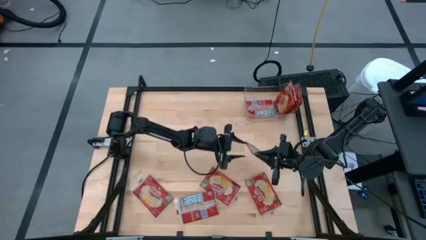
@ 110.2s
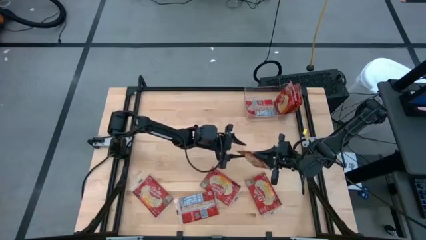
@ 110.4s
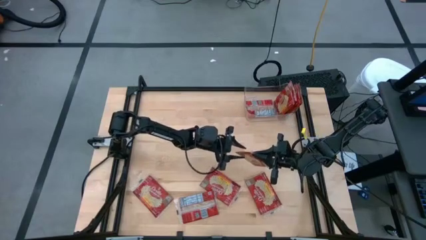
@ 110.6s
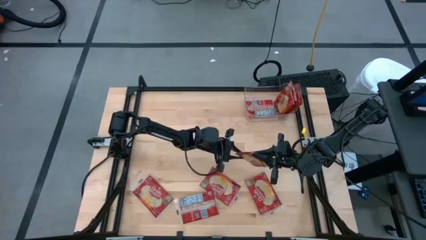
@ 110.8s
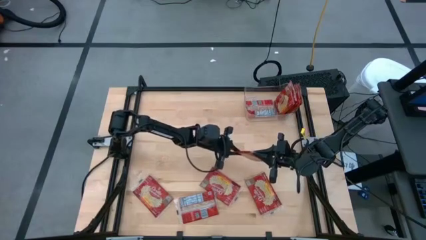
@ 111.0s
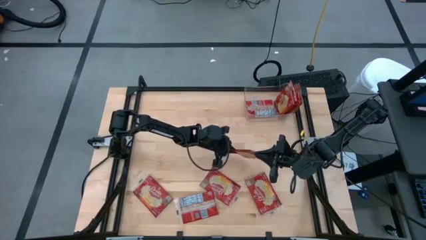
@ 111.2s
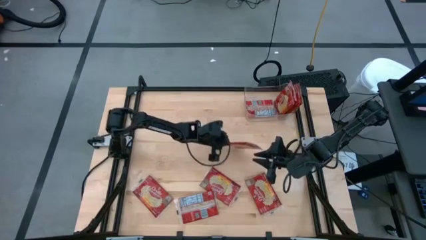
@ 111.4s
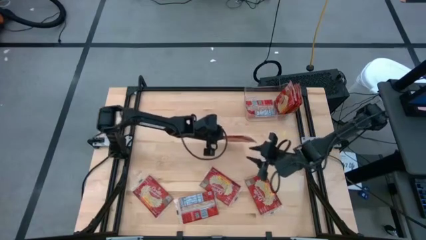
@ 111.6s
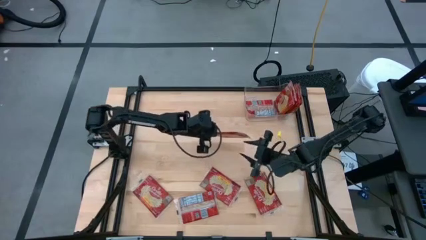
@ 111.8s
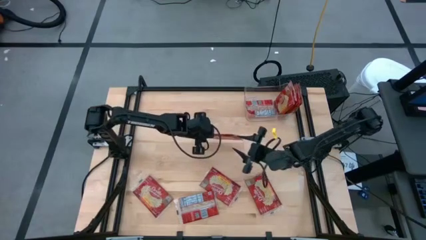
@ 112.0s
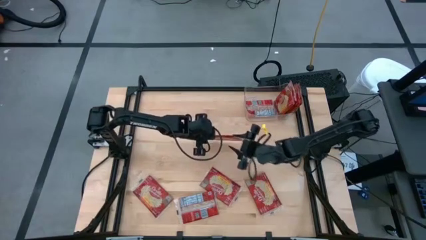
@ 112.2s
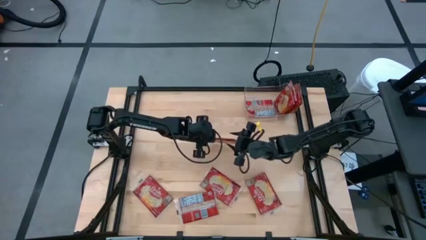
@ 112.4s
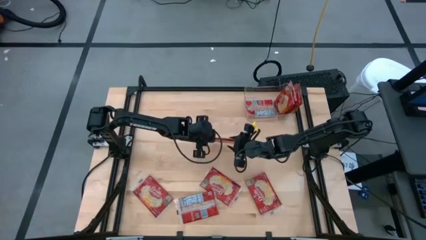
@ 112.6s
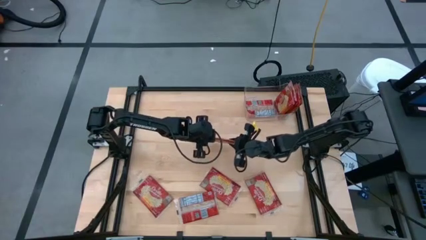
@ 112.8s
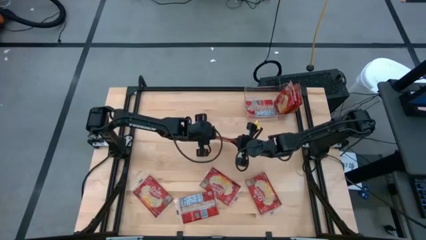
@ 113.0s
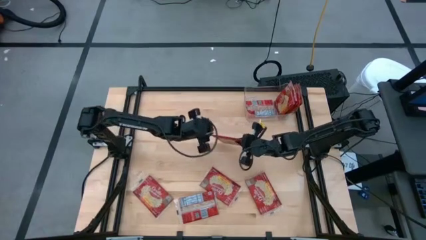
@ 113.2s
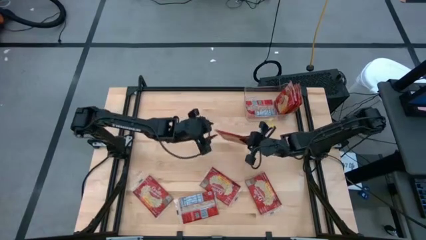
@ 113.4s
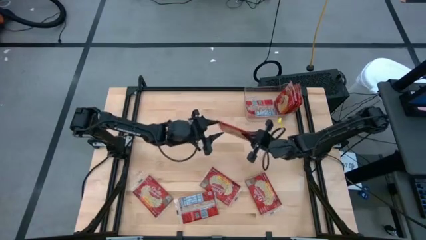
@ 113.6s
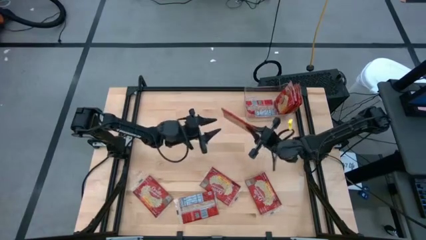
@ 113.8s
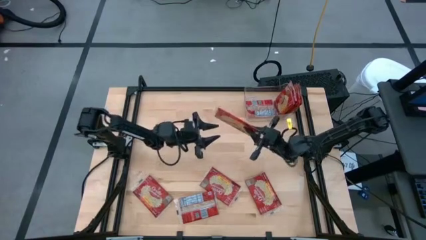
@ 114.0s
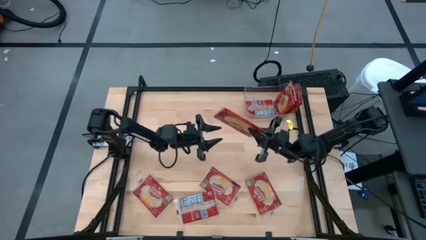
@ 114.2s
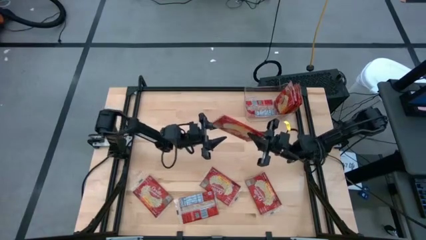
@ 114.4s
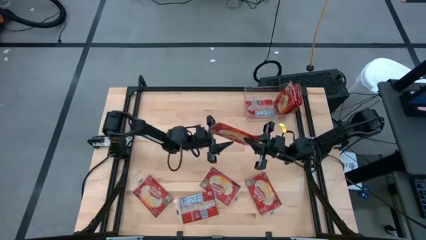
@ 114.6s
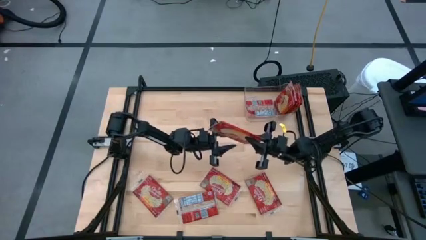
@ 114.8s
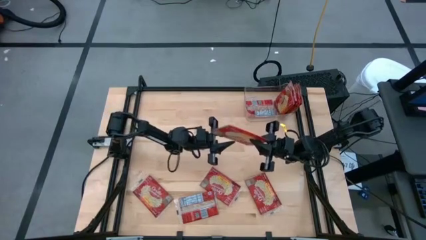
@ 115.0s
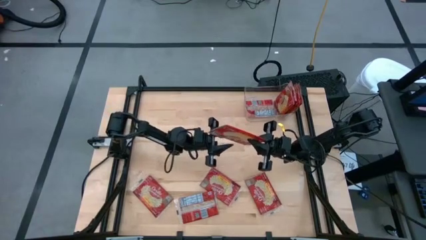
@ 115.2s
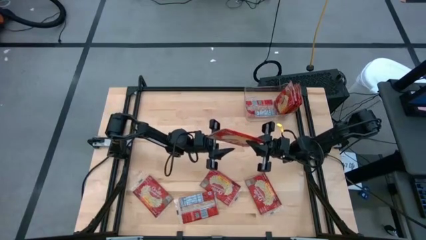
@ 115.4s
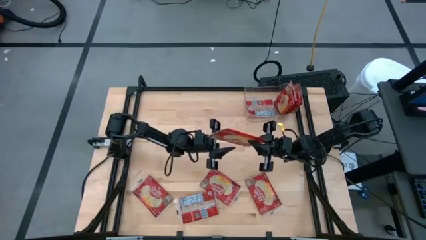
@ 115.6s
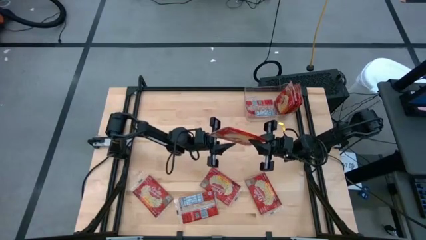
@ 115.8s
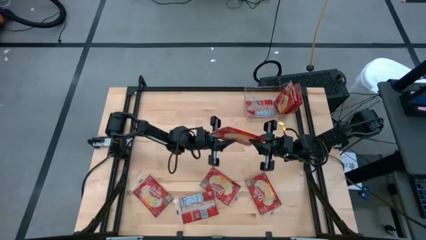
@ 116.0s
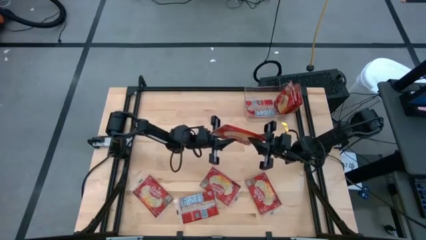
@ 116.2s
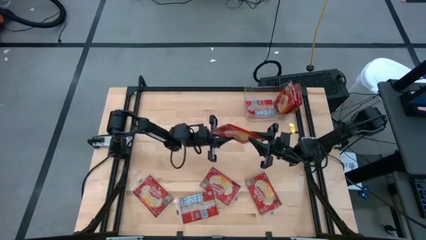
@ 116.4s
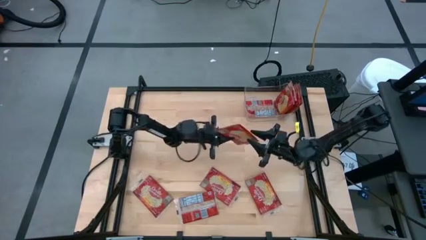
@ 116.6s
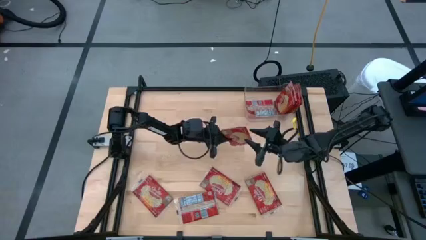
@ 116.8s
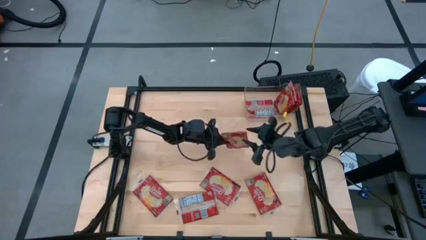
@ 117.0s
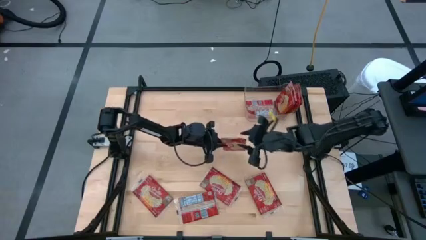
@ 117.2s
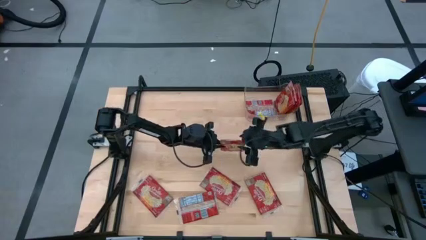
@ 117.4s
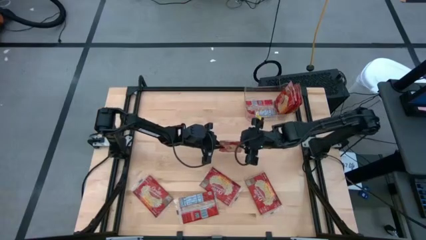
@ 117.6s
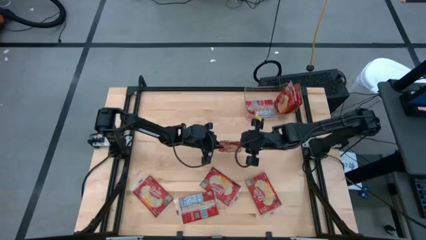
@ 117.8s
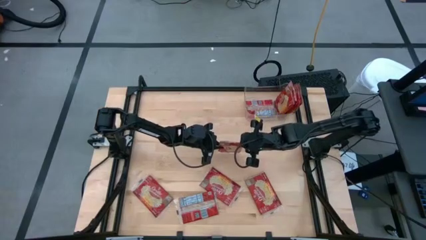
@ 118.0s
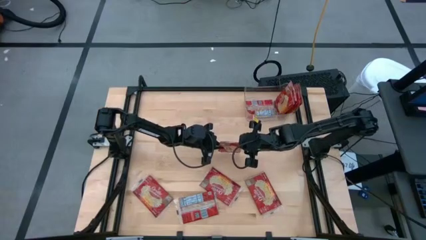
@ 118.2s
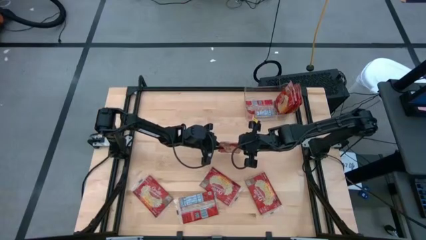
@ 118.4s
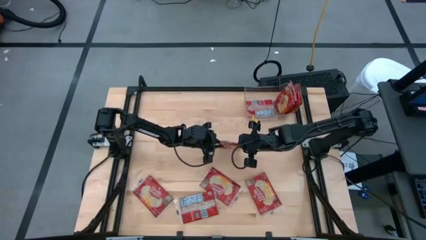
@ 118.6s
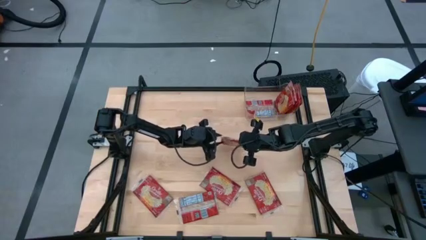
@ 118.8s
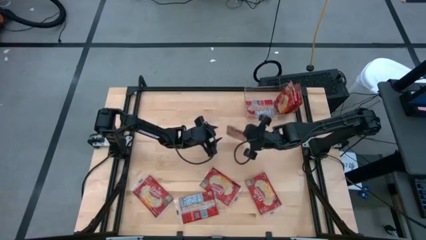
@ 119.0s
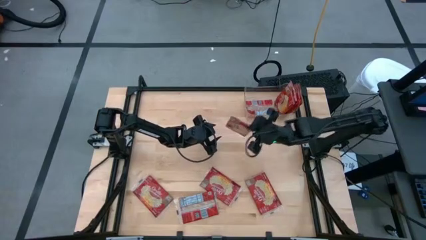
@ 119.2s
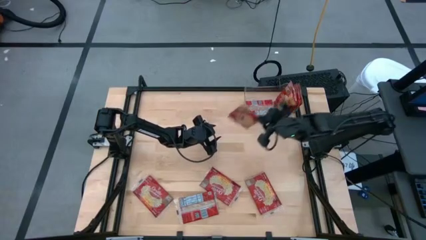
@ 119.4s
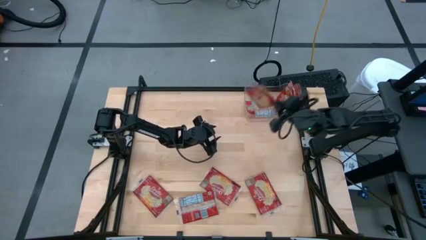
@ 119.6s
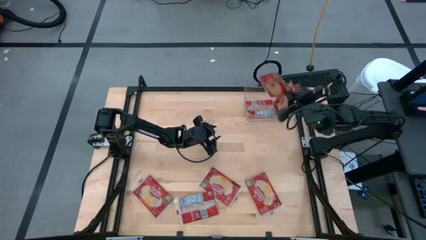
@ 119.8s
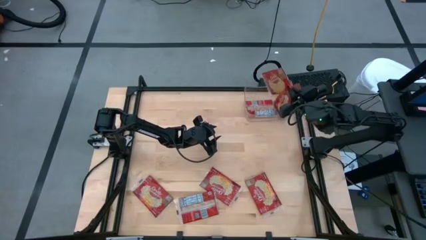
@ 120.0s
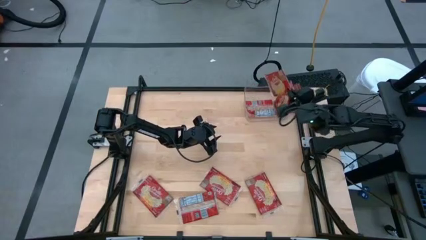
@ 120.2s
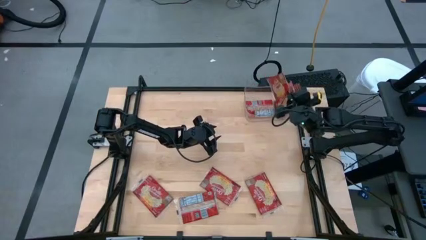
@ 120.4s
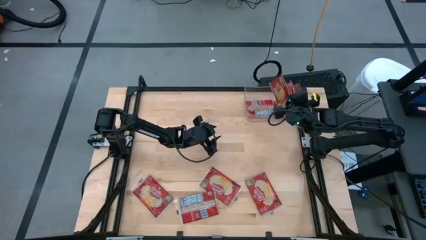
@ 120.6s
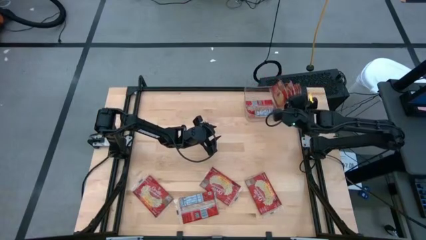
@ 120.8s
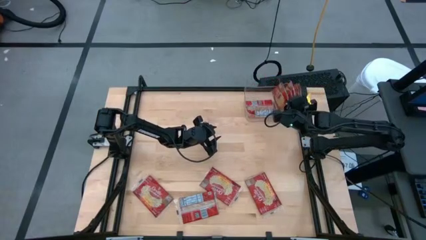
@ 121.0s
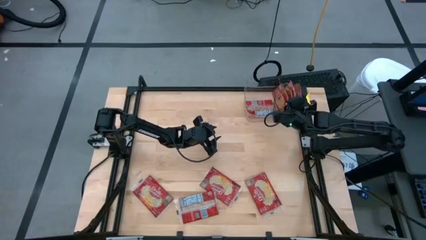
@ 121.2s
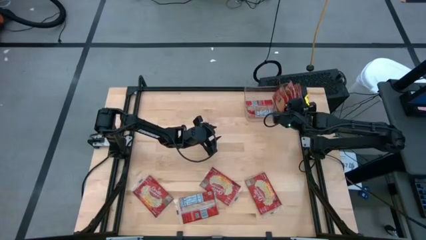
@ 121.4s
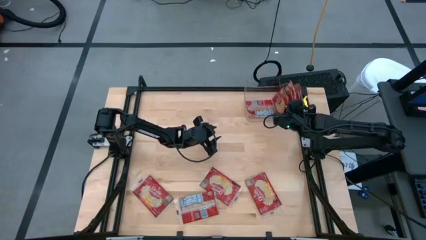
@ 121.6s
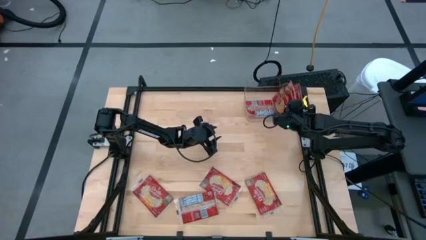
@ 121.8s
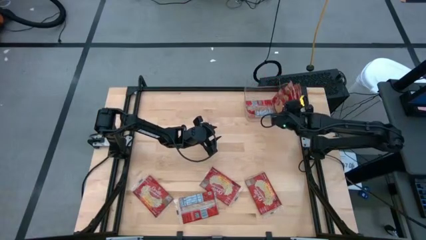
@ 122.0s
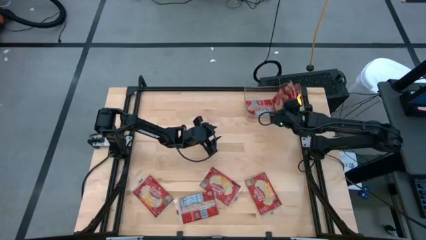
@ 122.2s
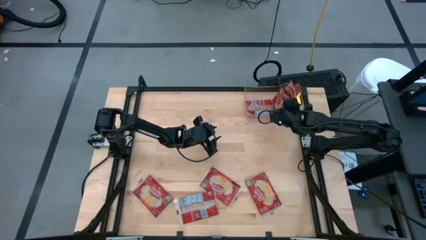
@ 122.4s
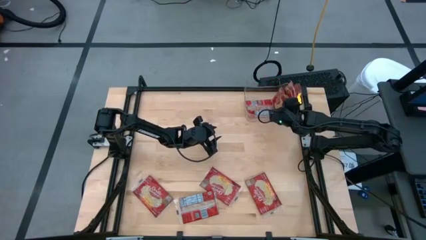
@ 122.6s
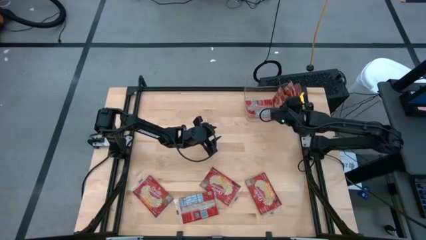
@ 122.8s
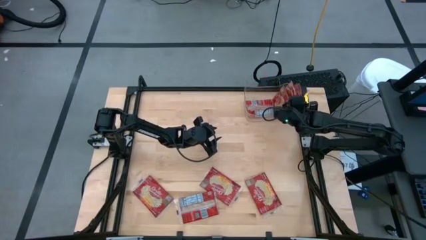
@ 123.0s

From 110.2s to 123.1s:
Task: Sort popcorn bags into baskets
Put the red popcorn bag into the transparent bin

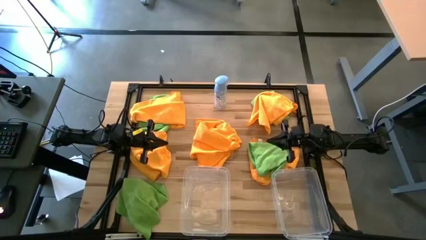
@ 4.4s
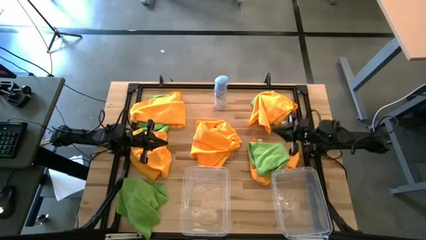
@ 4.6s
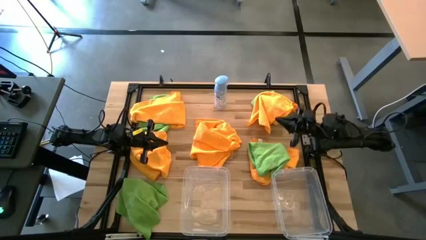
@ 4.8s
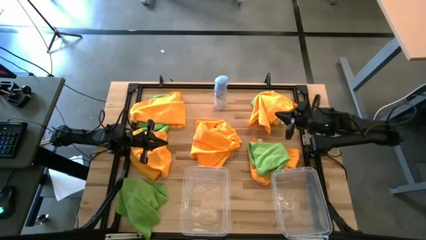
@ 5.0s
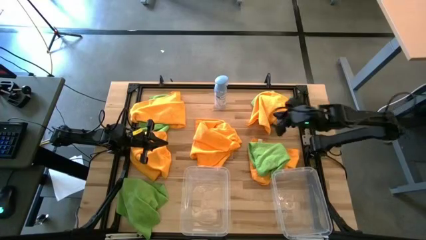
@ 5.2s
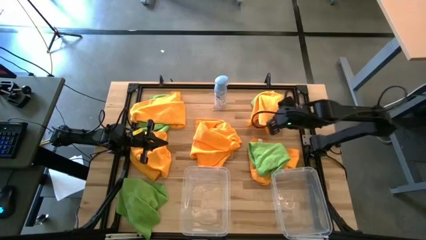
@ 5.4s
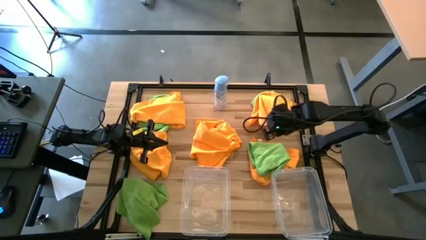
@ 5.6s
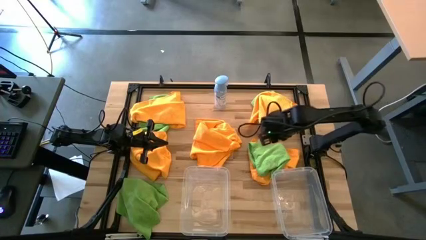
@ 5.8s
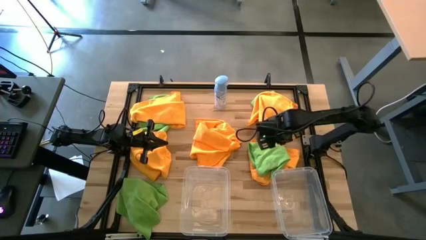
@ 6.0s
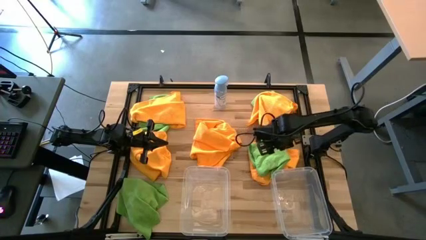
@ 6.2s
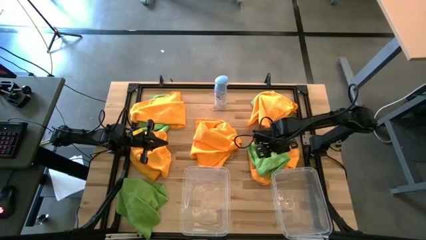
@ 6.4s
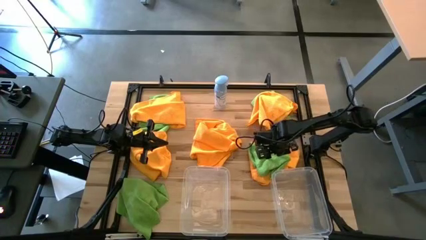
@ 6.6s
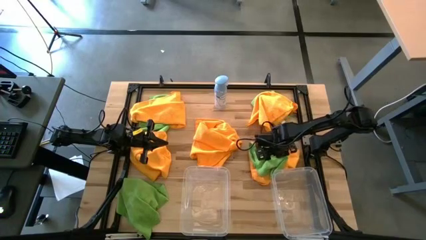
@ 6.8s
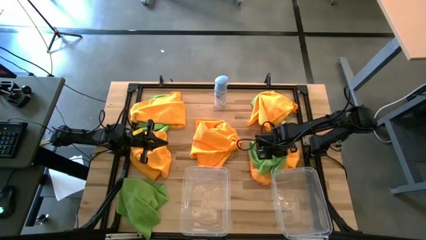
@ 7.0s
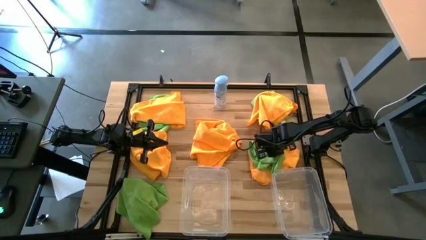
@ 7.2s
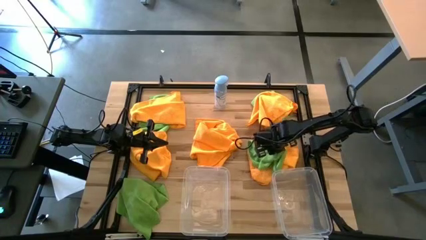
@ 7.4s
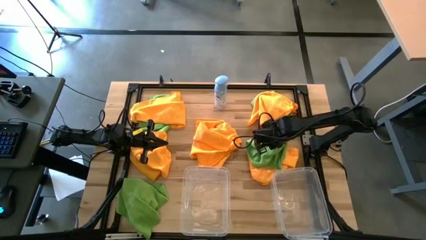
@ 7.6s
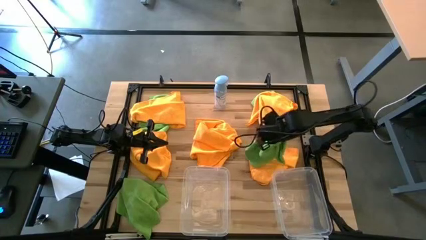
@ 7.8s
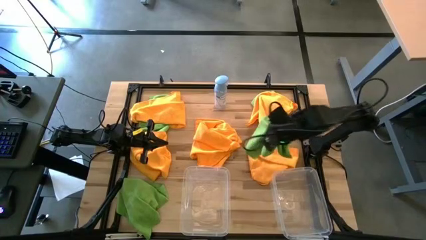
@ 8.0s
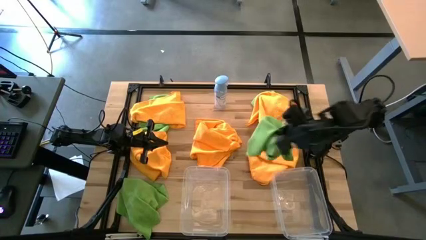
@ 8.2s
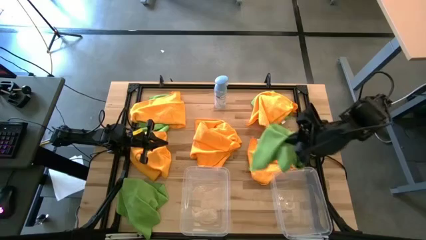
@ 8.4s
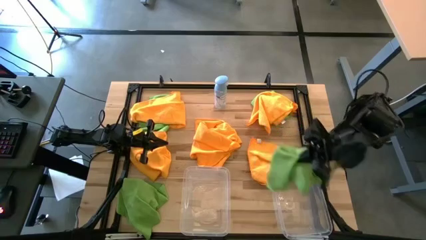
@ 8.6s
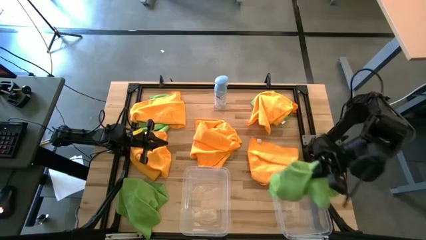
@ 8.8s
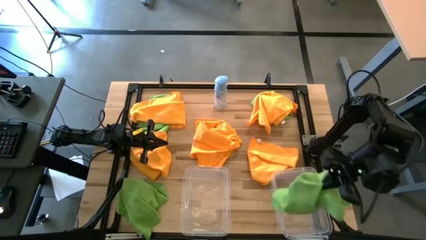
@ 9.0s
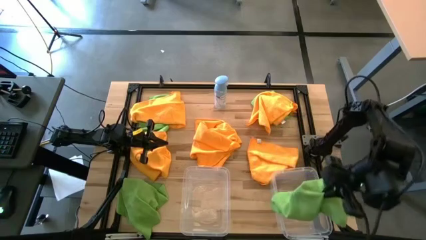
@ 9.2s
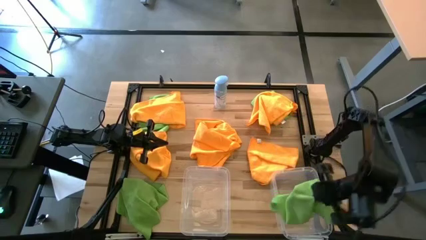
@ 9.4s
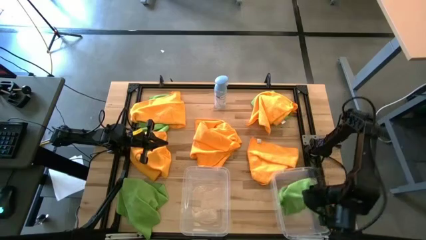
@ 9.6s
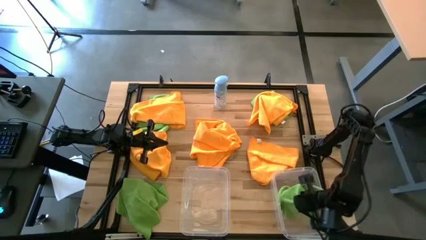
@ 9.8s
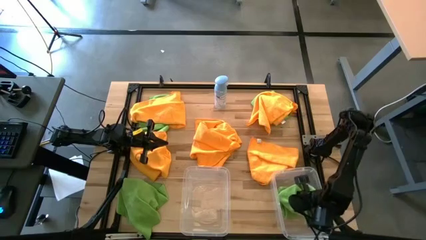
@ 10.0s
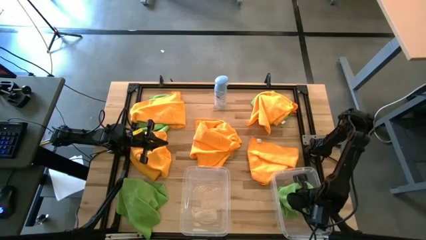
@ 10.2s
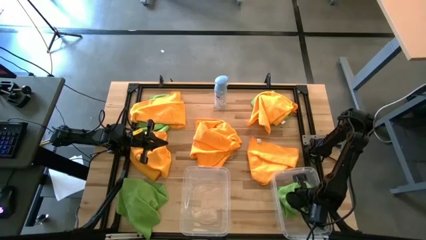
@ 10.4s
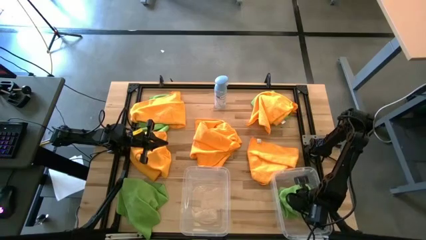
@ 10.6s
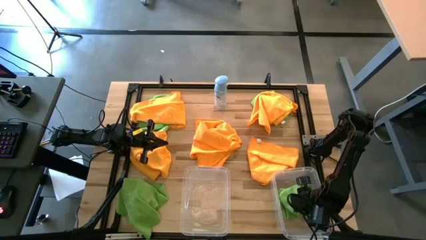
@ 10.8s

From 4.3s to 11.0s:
Task: Sort microfiber towel by color & place in baskets
Put the green towel into the right transparent bin
